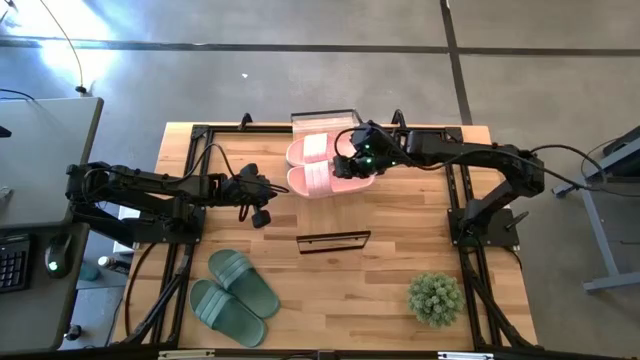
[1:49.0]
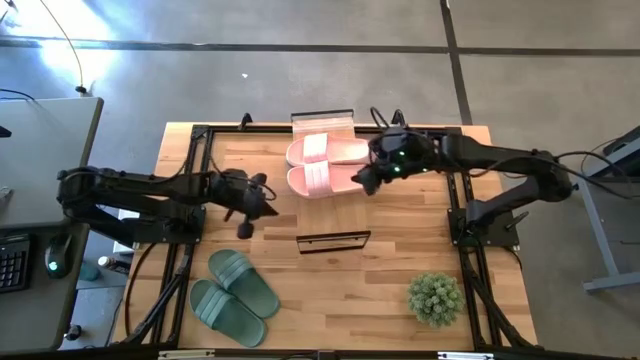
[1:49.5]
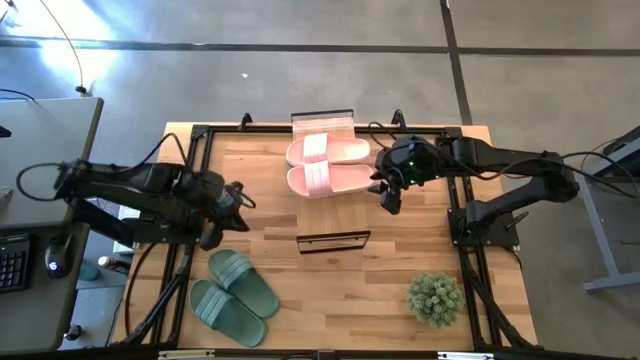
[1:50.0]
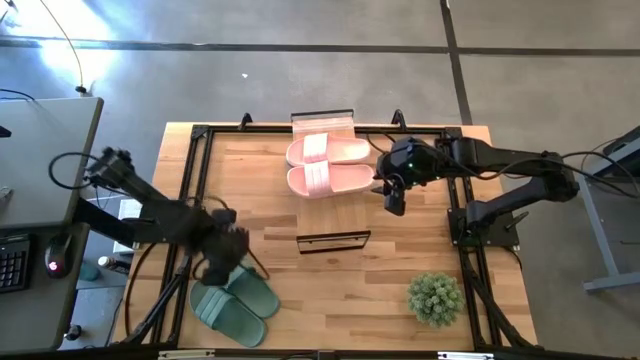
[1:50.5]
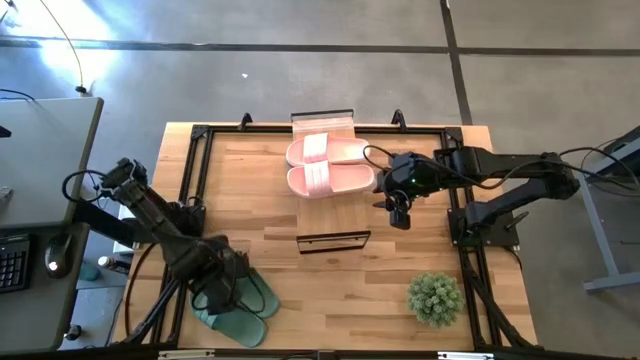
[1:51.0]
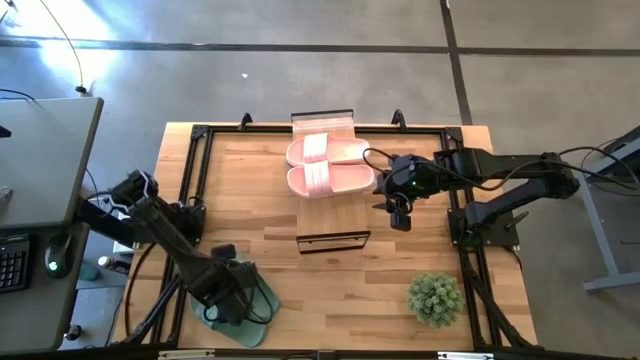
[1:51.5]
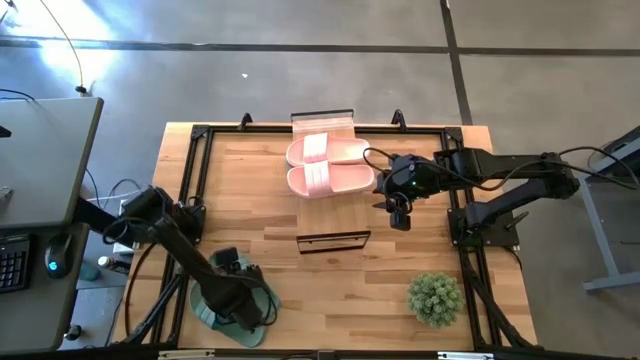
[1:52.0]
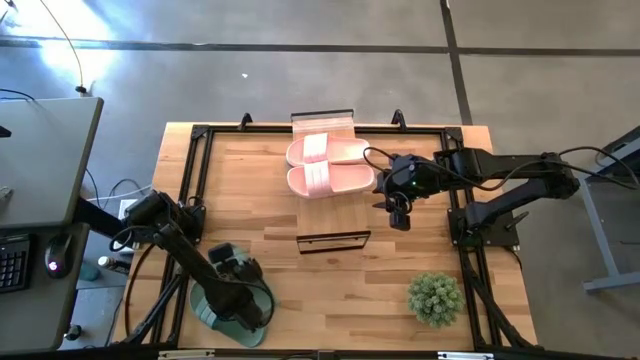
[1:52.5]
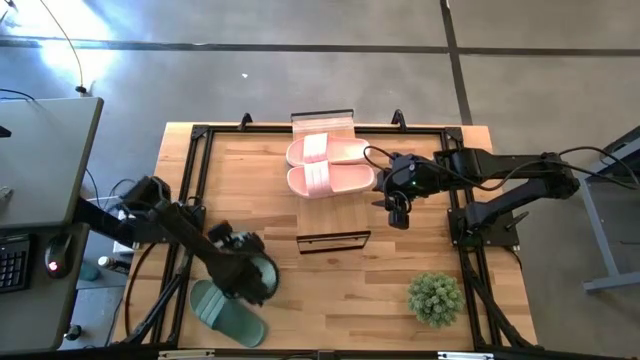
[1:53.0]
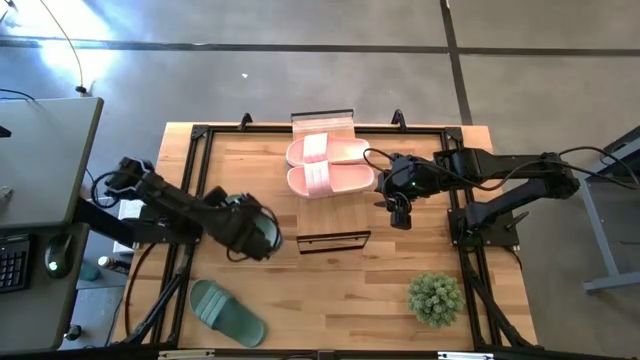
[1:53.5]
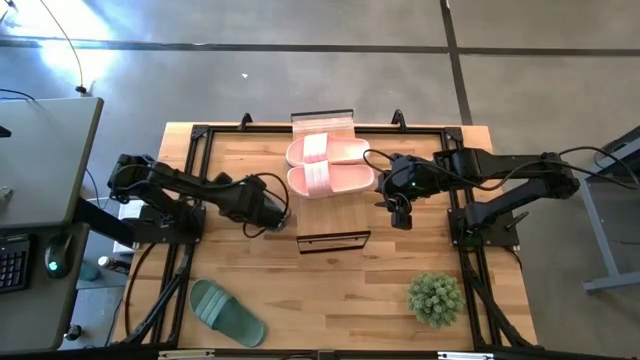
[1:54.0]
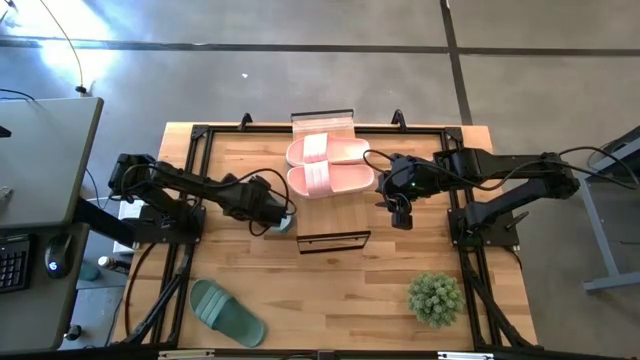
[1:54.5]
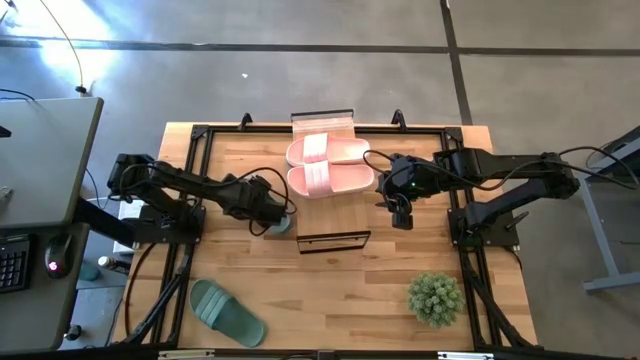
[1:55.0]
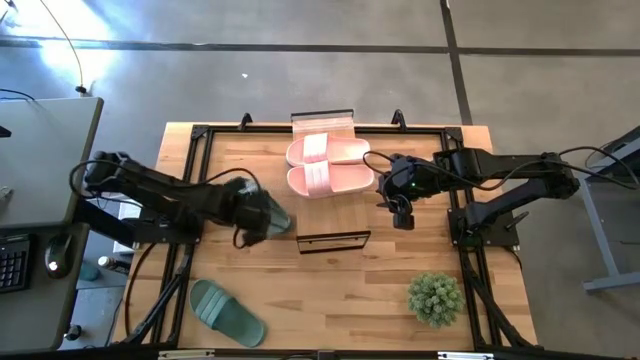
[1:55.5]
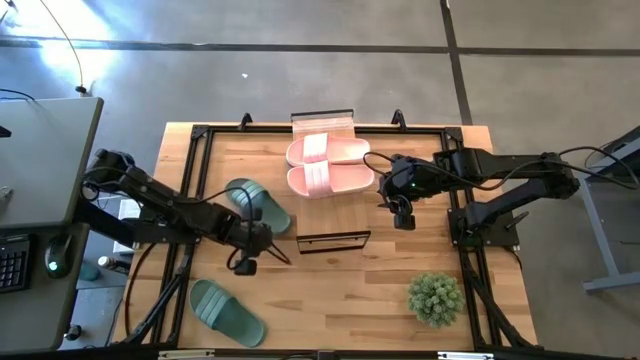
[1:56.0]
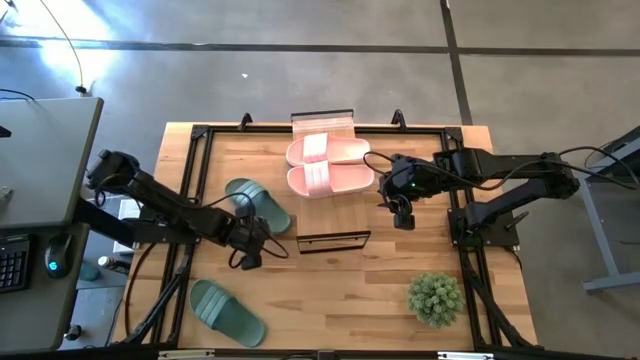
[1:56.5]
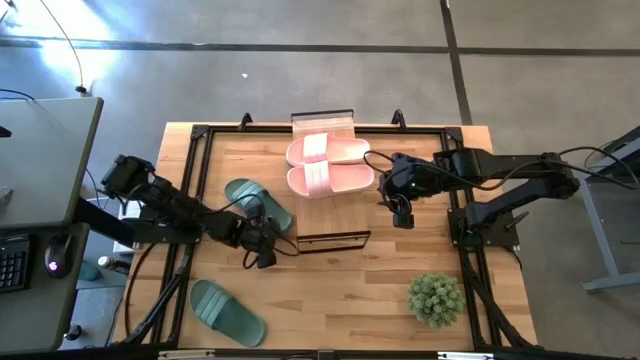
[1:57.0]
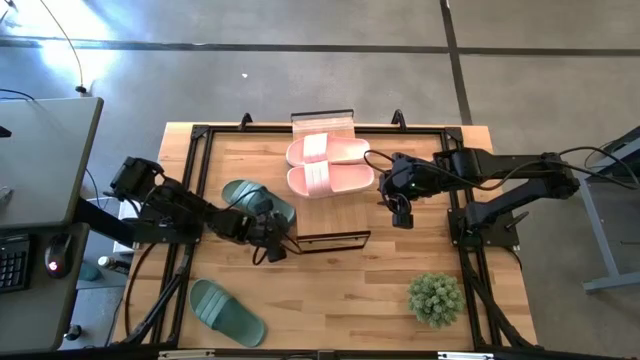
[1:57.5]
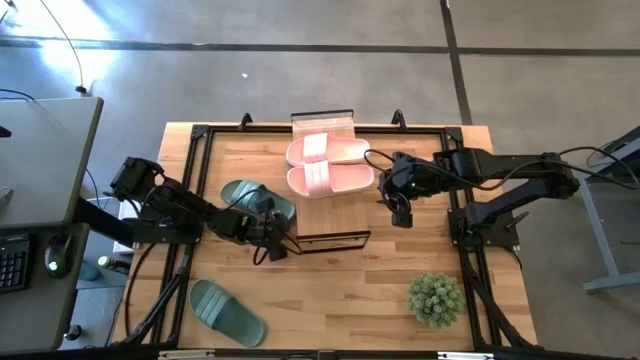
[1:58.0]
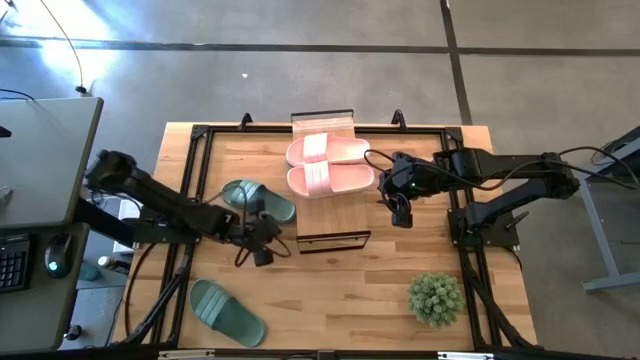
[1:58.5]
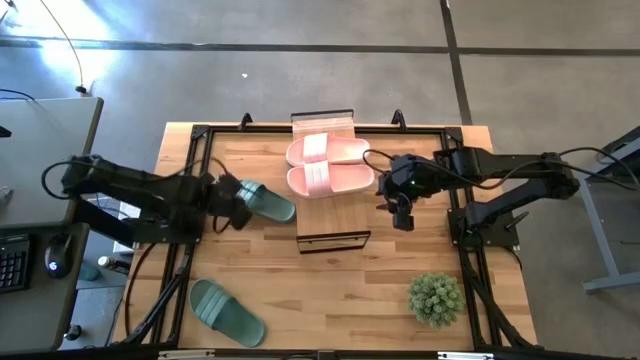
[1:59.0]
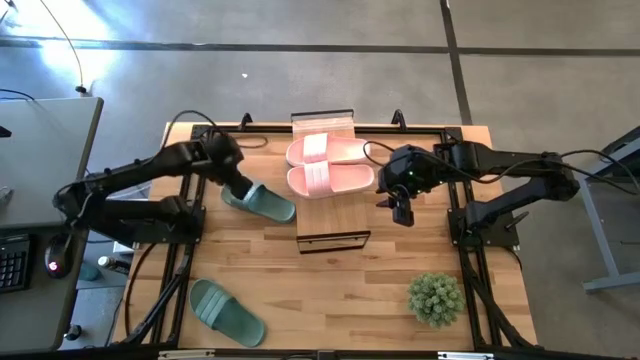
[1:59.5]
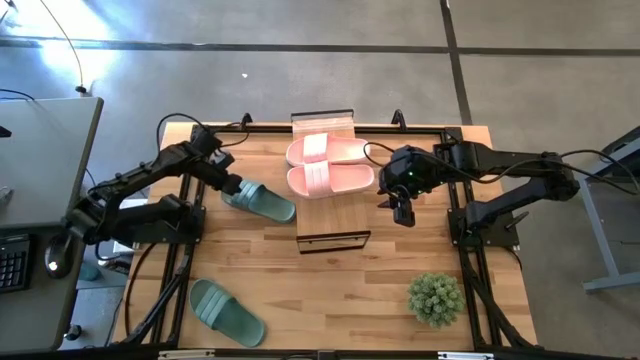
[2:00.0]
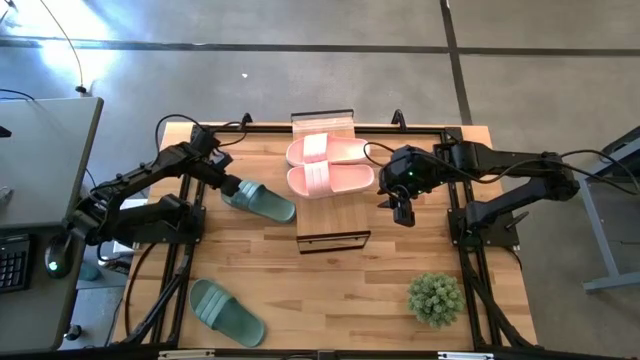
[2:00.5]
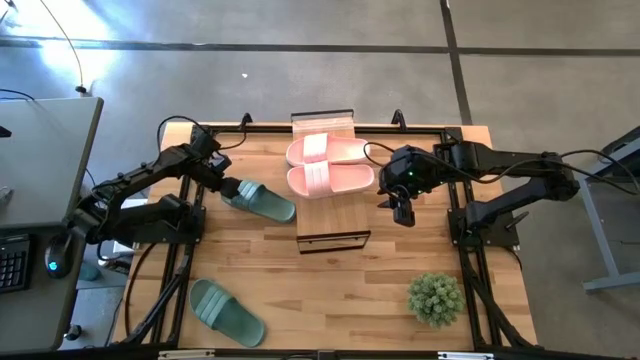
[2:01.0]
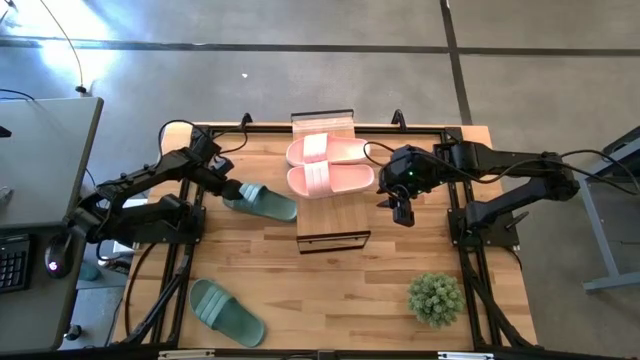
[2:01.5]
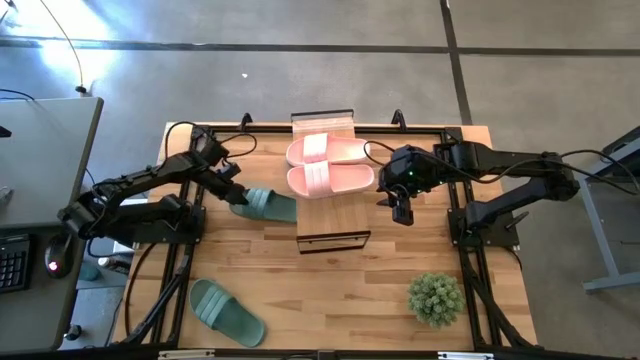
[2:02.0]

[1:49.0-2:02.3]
Task: Pick and place slides into the shelf
Put the green slide under the shelf

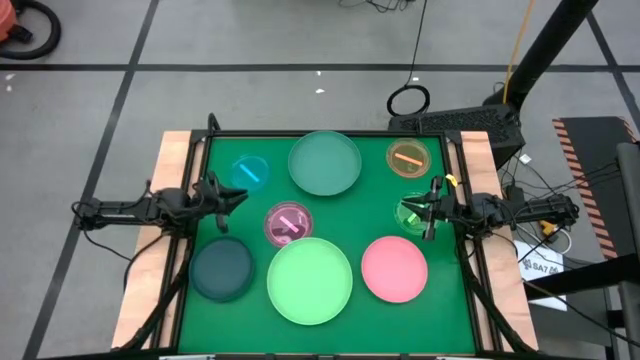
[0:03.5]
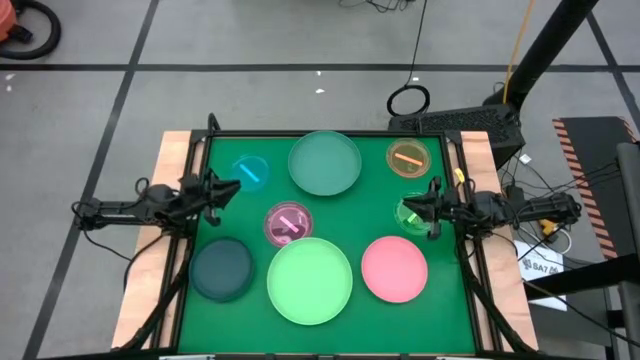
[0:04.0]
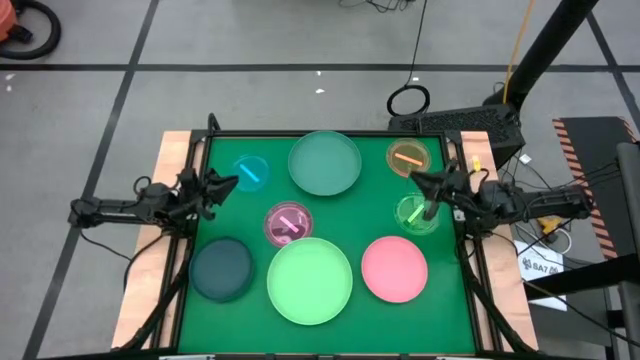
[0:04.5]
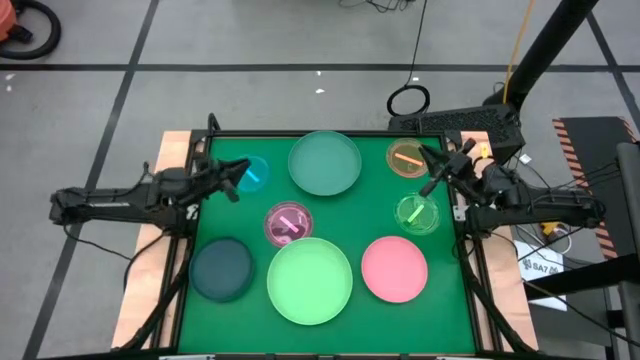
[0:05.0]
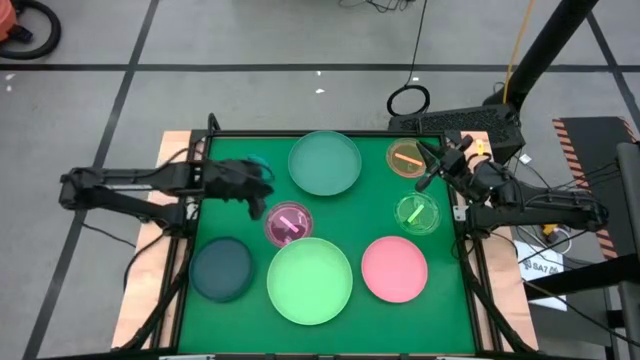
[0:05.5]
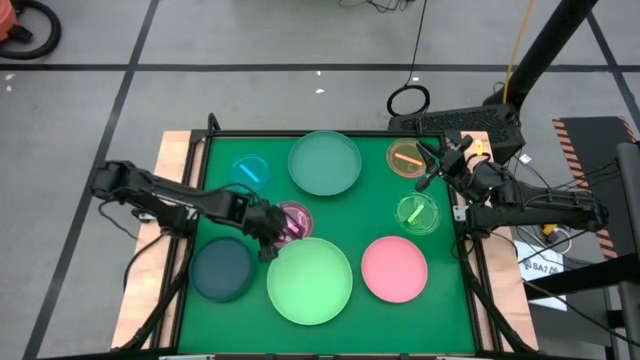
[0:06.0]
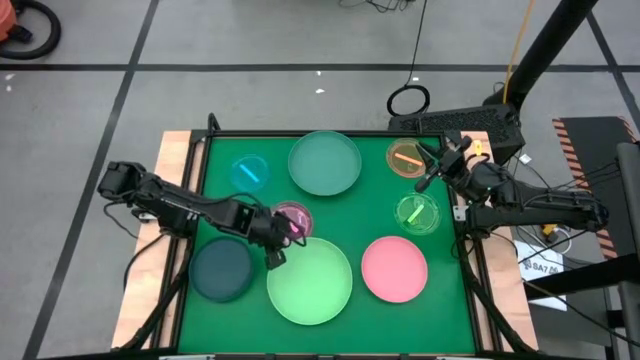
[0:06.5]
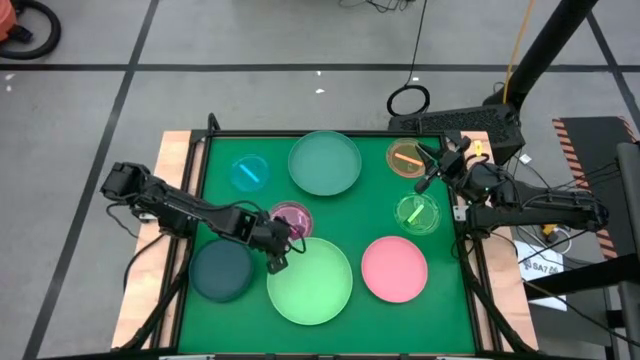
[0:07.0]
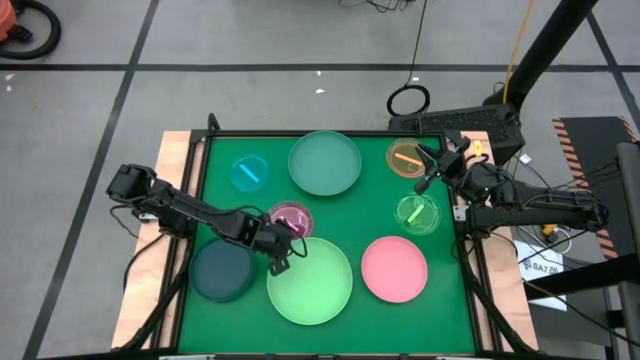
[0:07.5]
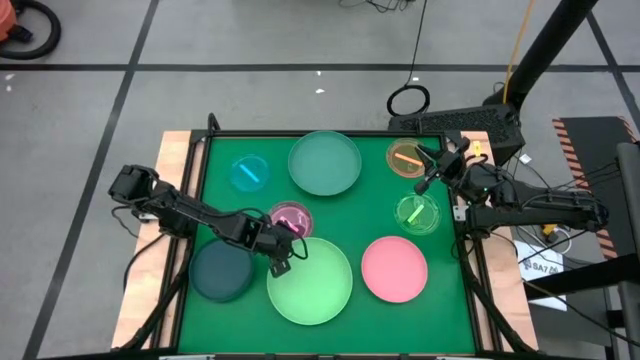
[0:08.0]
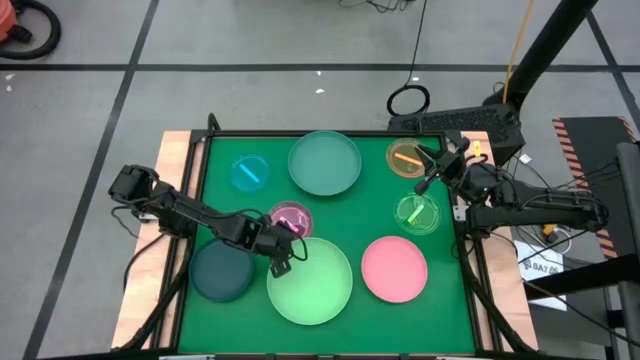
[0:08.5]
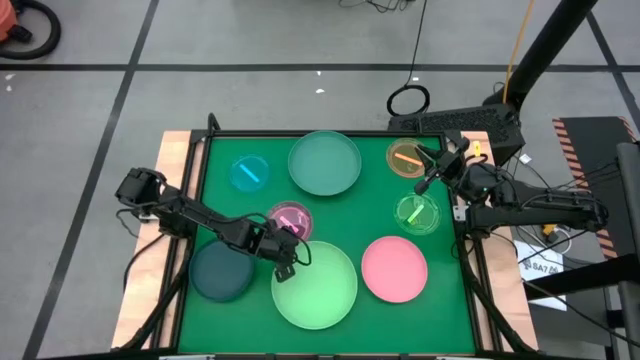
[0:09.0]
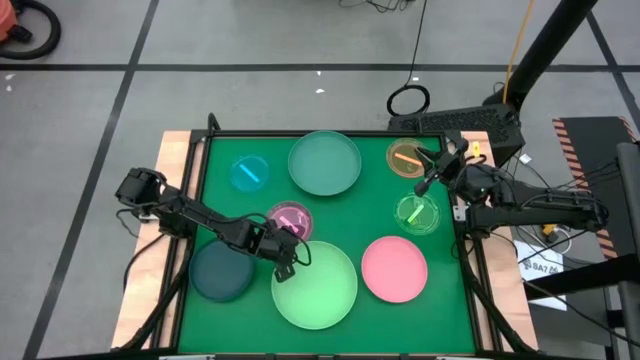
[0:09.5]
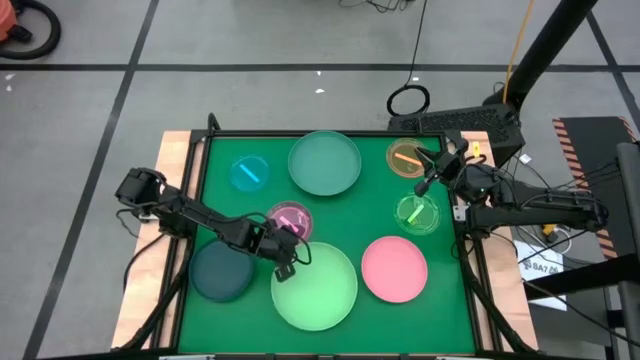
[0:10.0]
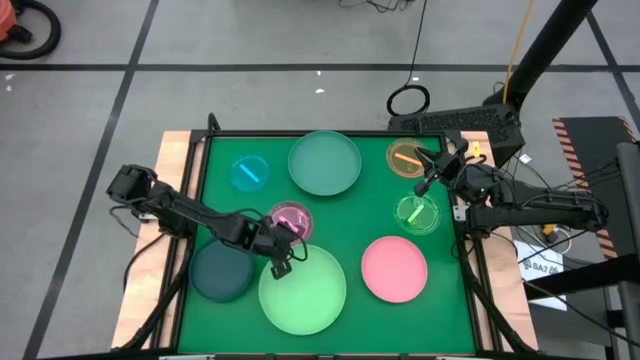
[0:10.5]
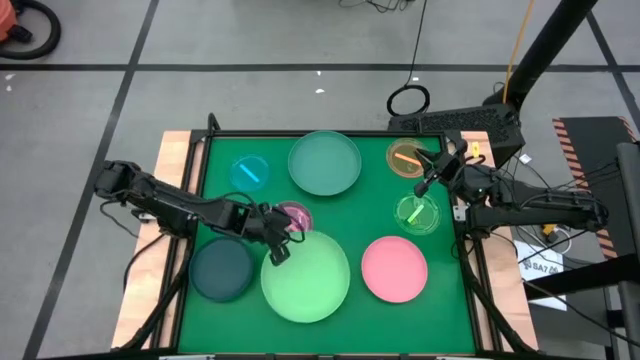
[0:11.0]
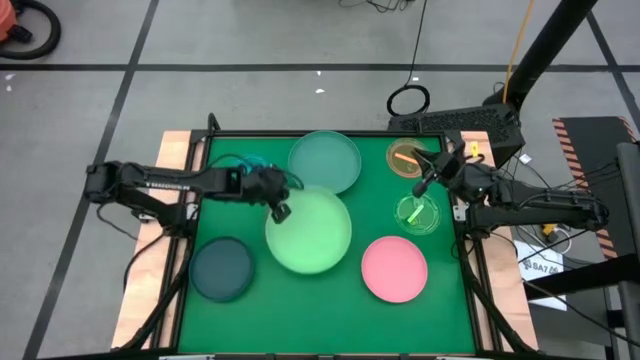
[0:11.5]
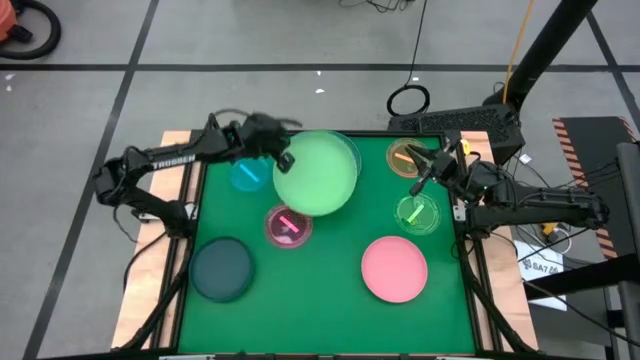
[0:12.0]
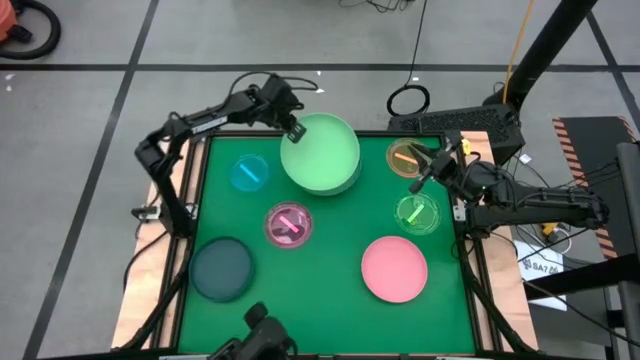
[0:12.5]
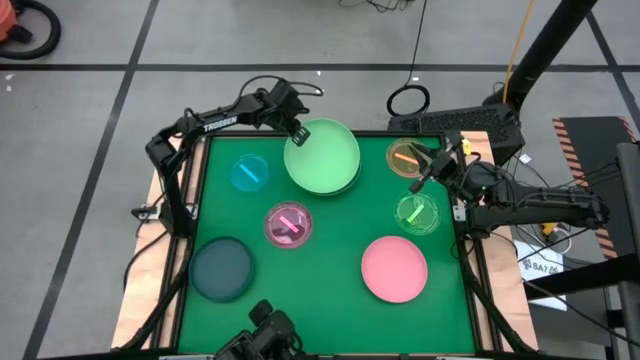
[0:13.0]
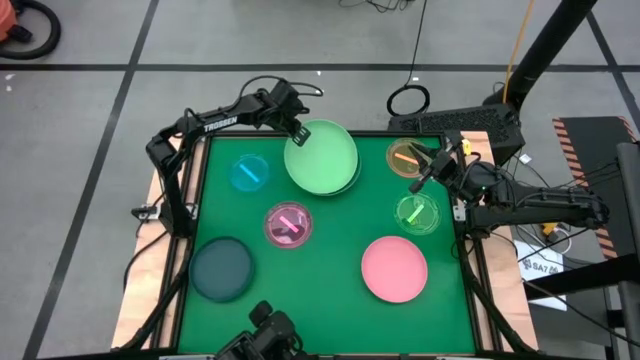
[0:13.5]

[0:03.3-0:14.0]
Task: Stack plastic plates
Stack the light green plate on top of the dark green plate
